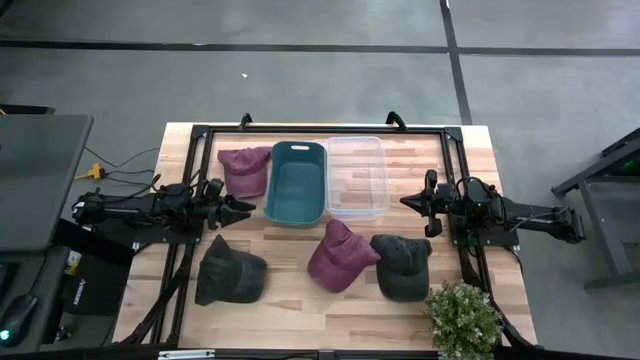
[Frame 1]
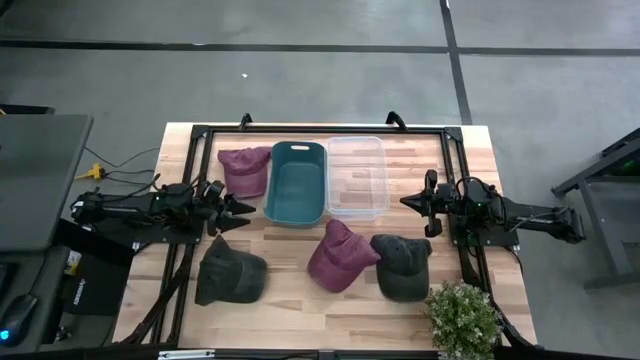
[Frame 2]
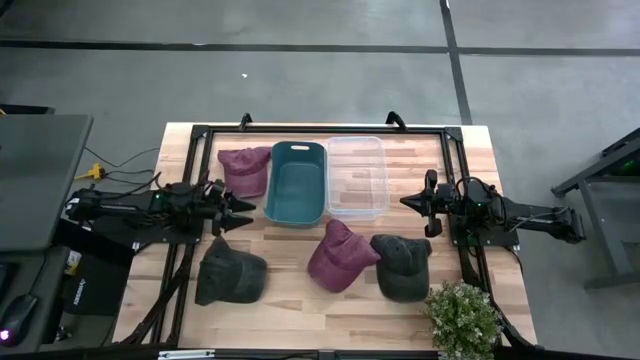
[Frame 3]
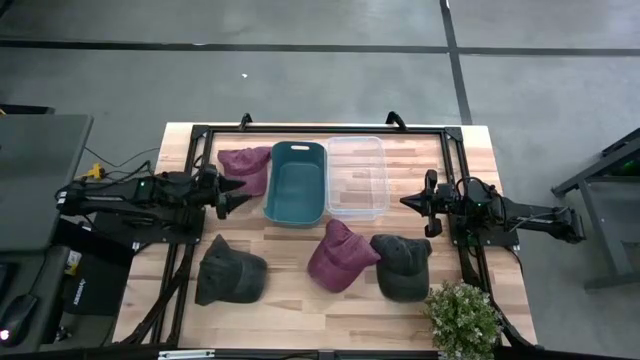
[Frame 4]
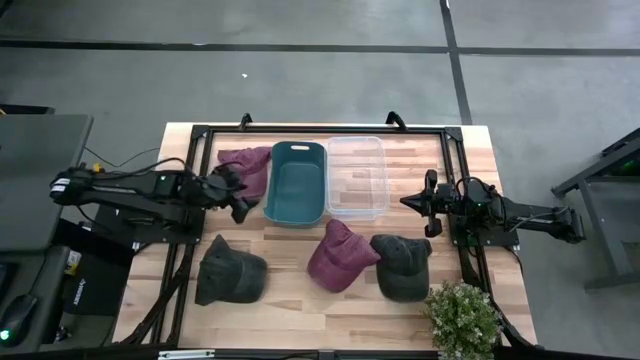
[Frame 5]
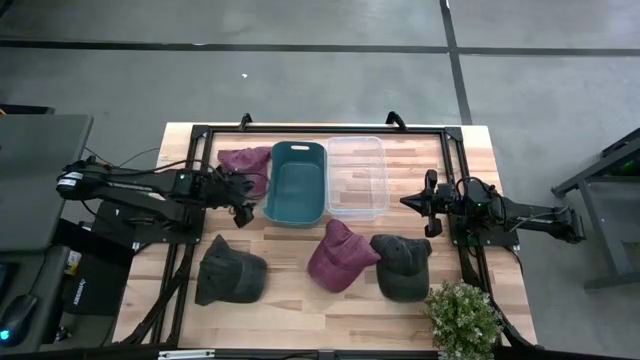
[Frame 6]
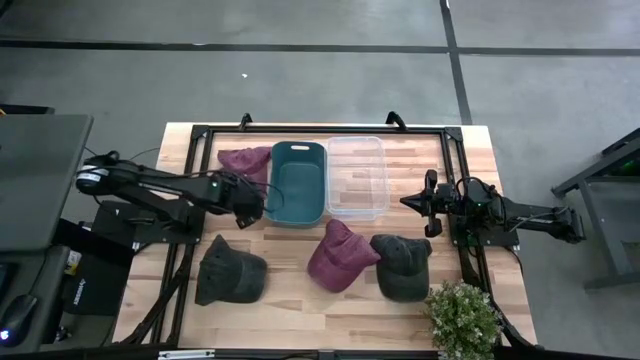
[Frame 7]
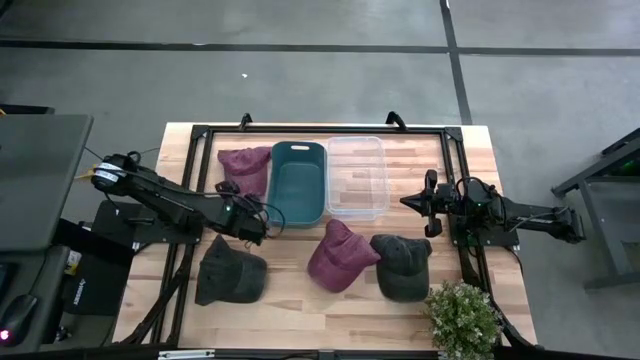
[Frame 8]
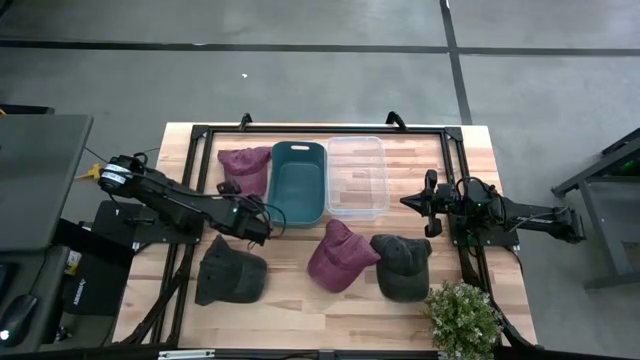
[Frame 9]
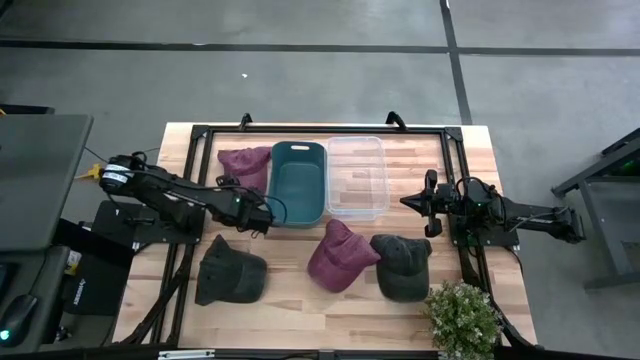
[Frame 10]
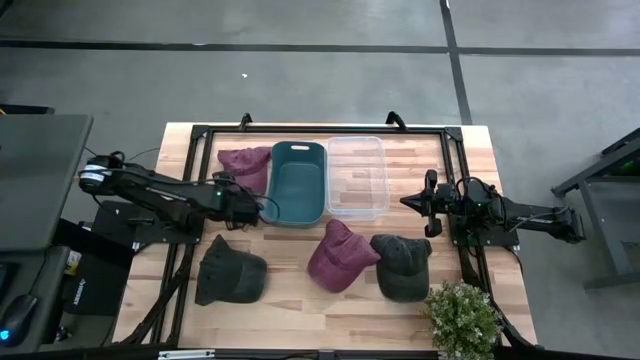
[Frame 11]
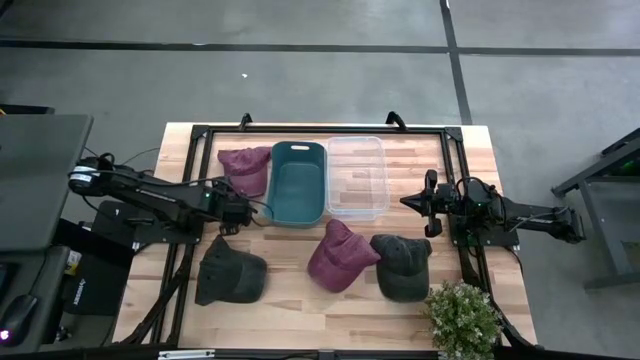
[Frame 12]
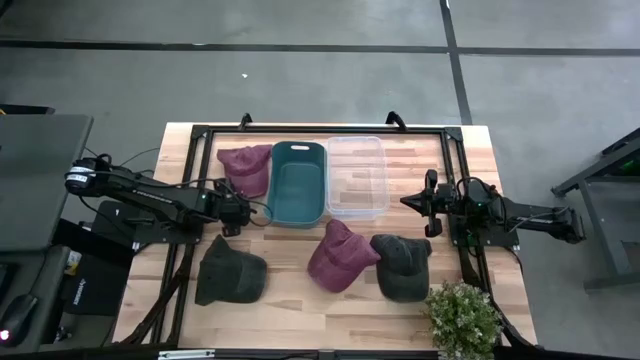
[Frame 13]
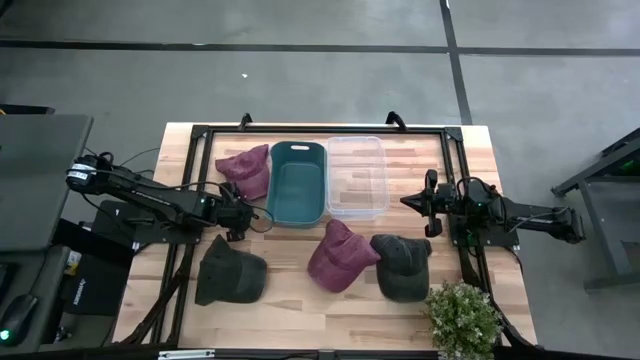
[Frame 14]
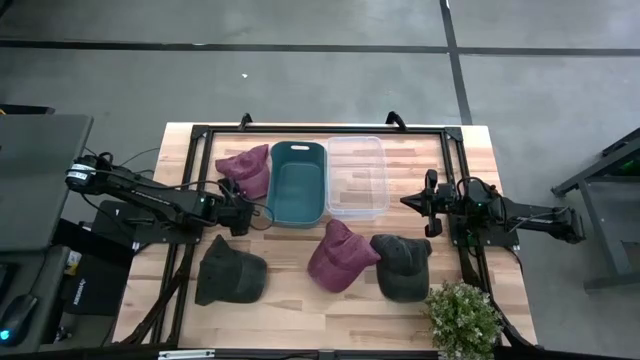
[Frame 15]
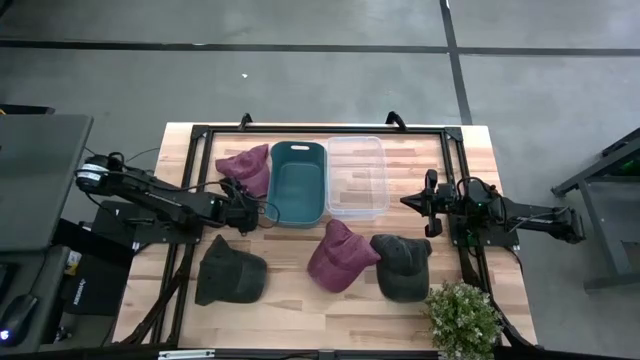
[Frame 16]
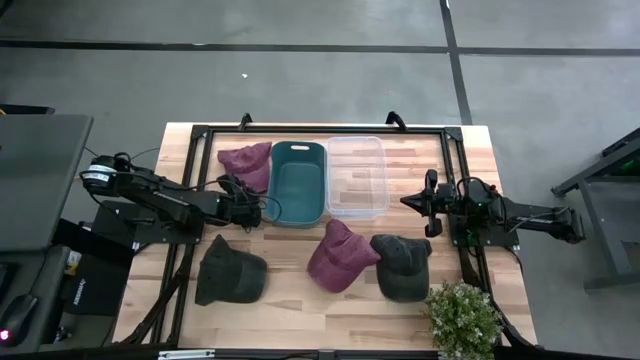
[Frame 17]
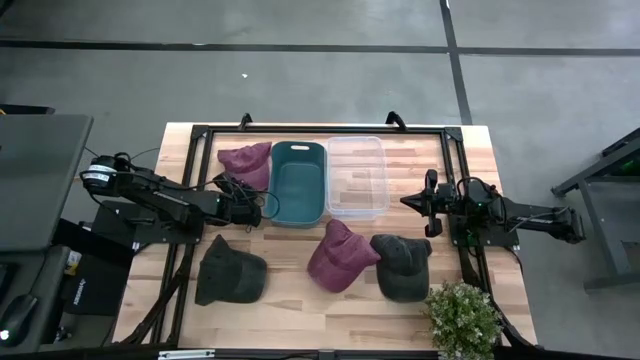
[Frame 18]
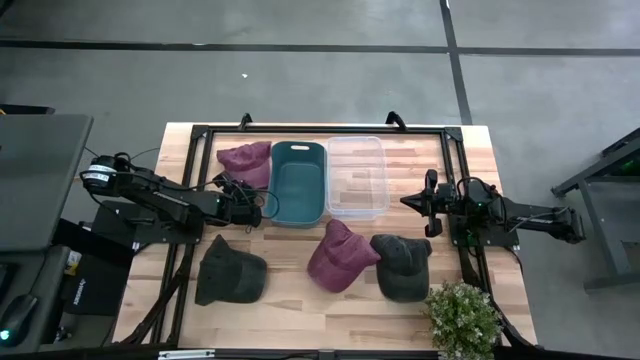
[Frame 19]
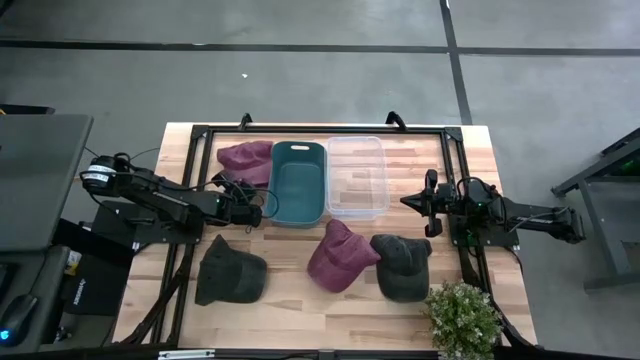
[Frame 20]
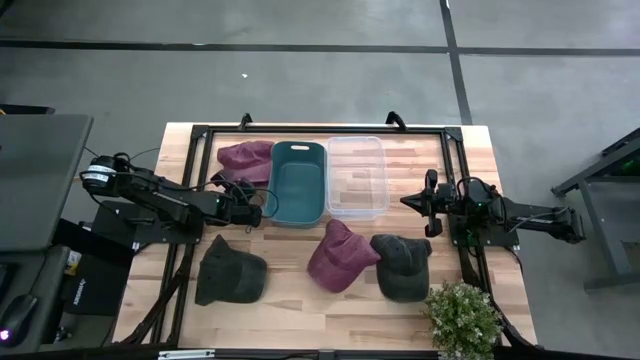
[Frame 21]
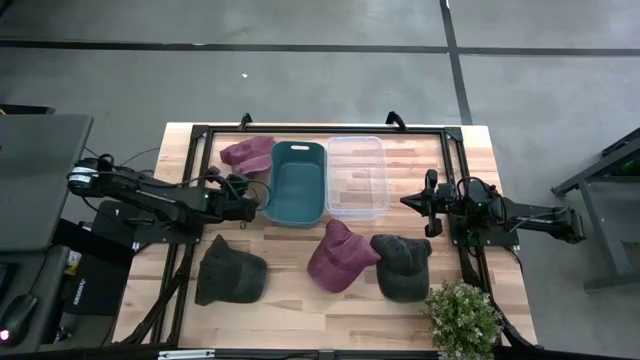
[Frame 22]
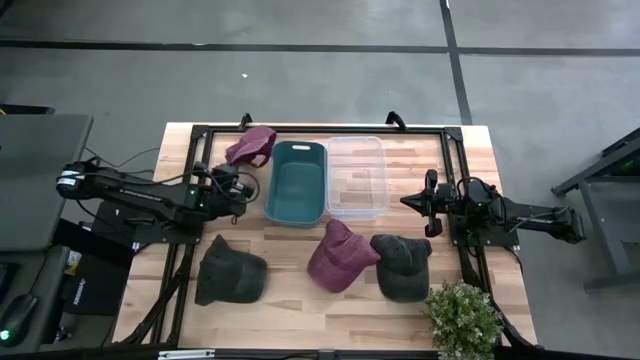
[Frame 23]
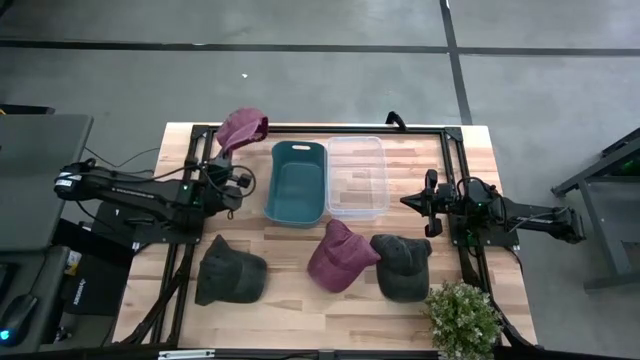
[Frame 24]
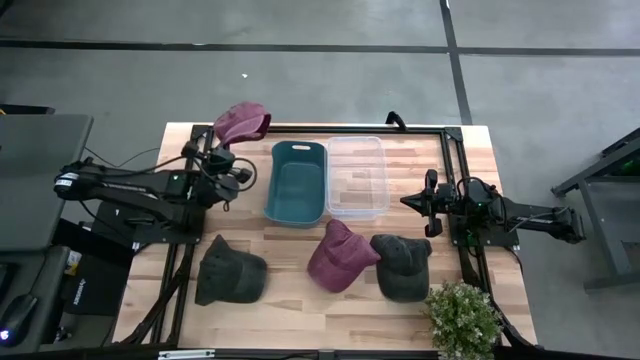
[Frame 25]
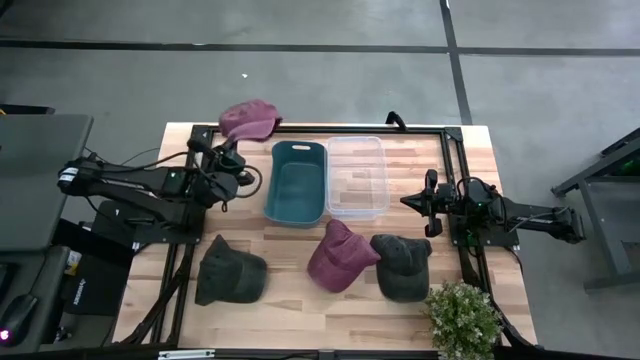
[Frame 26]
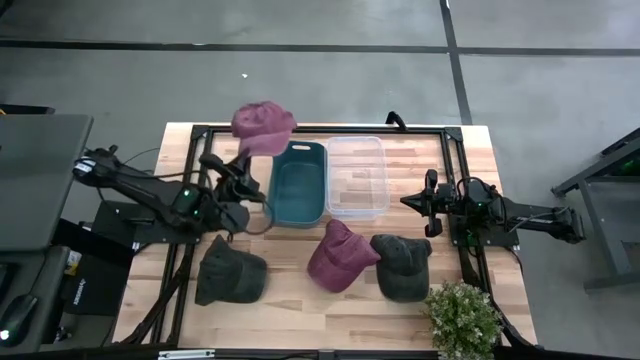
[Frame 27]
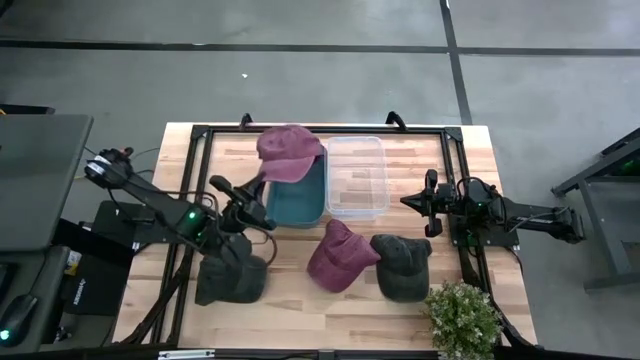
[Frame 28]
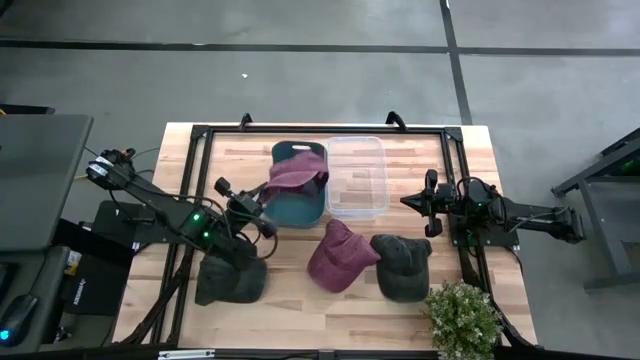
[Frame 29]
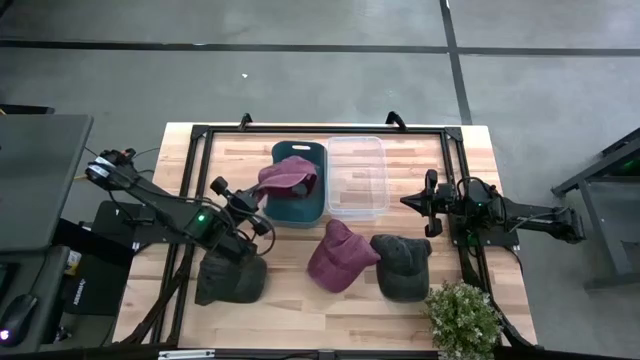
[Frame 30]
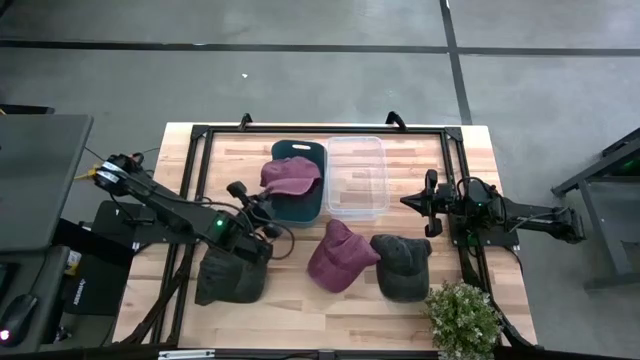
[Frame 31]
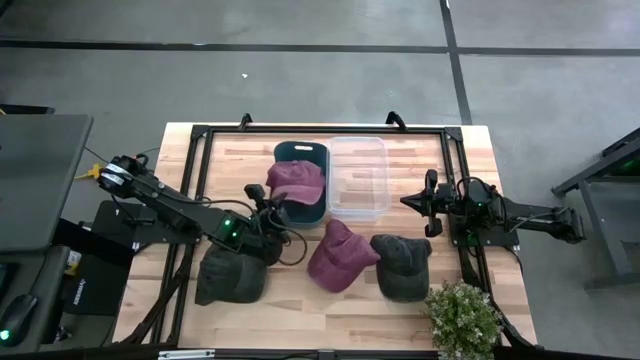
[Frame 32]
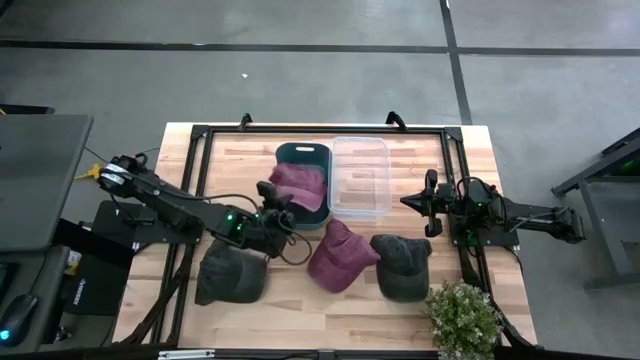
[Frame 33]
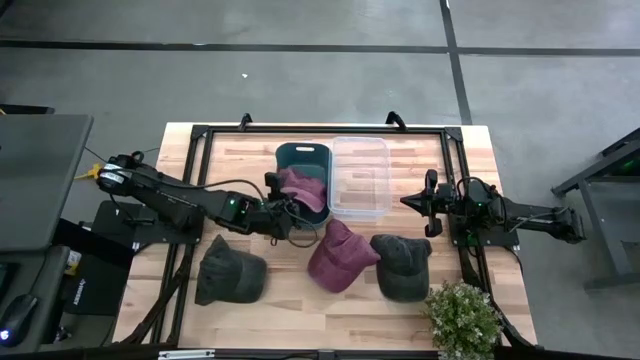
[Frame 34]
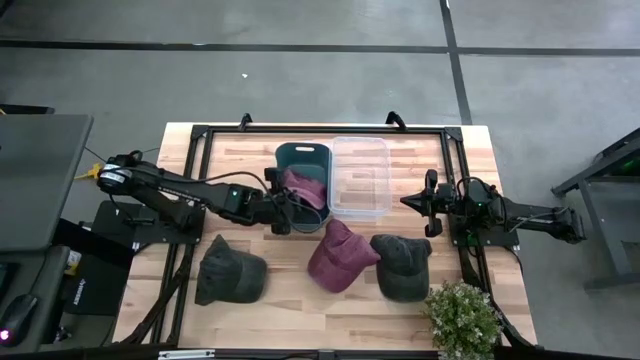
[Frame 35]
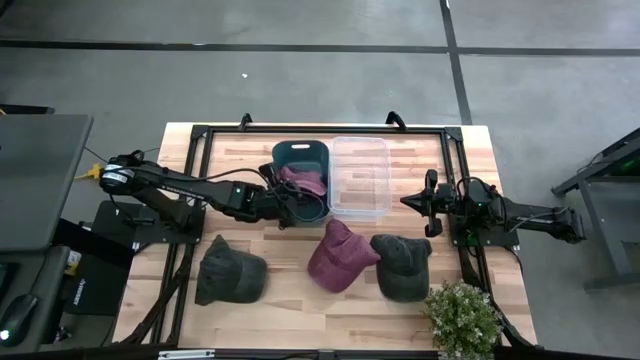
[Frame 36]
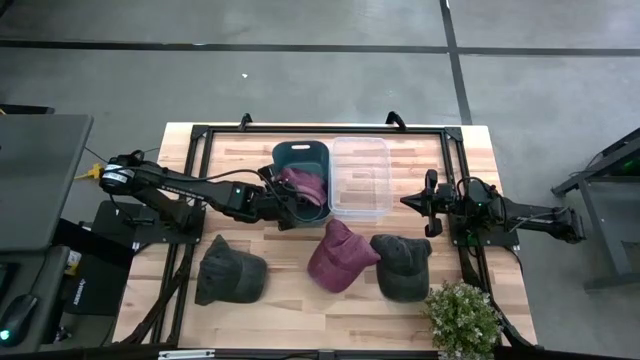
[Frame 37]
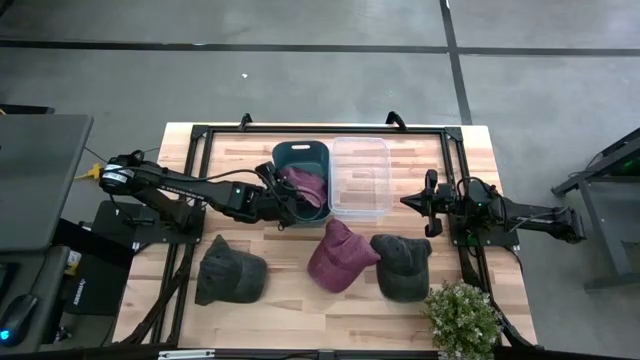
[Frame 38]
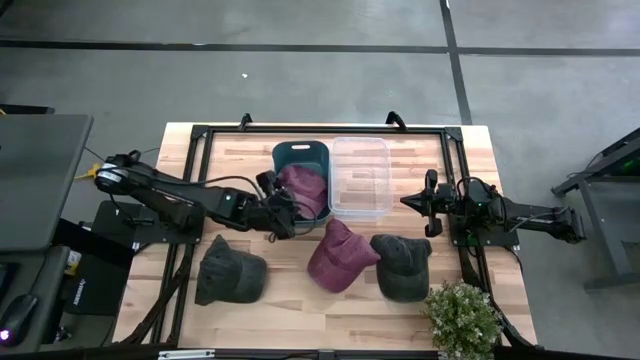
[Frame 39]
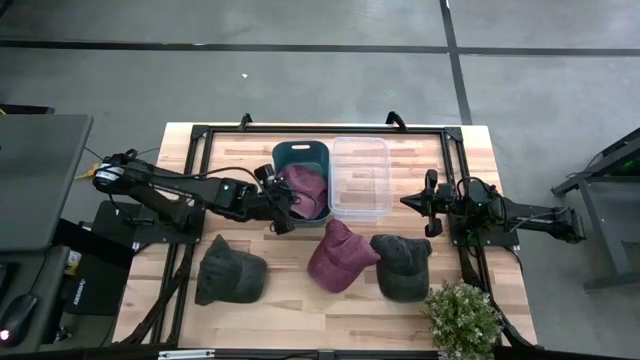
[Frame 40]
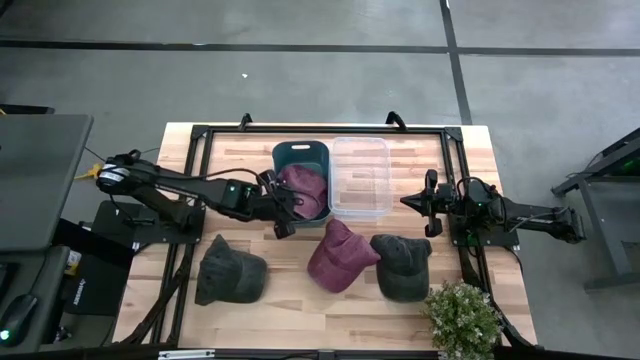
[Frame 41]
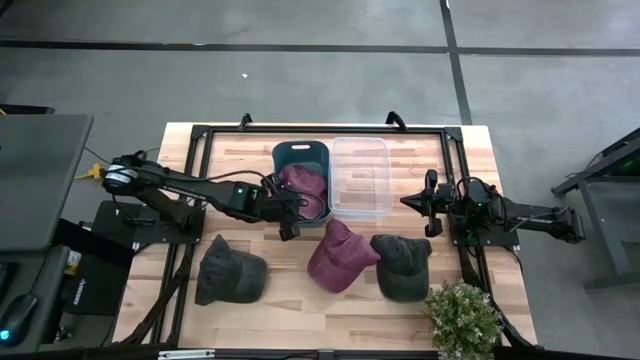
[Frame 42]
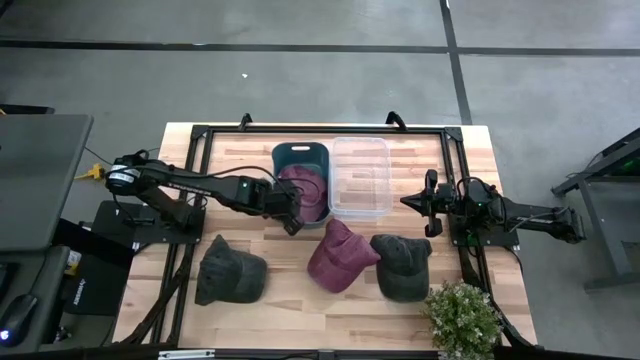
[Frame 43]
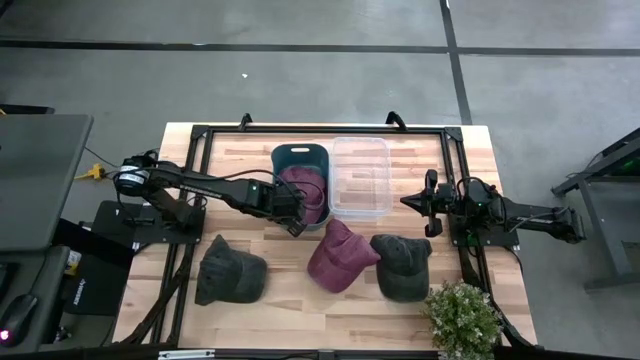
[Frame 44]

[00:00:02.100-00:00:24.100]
Task: Pick & Place hat
Put the top red cap into the blue bin
